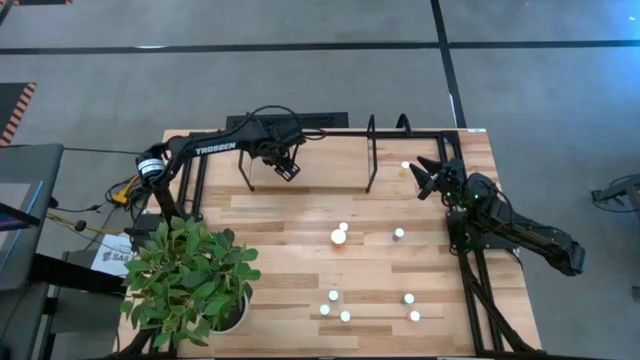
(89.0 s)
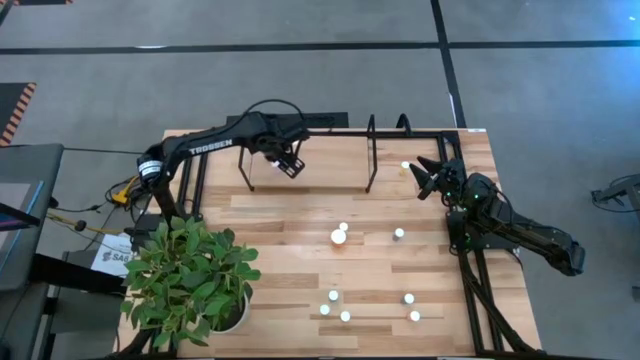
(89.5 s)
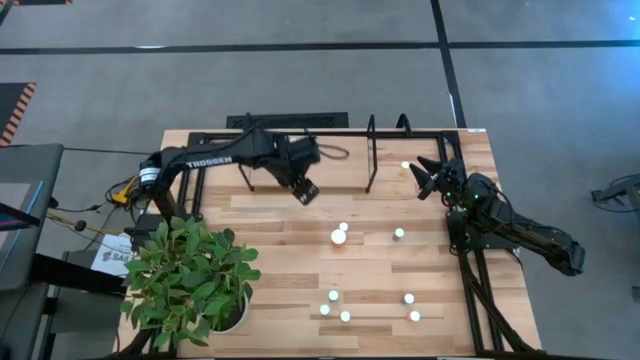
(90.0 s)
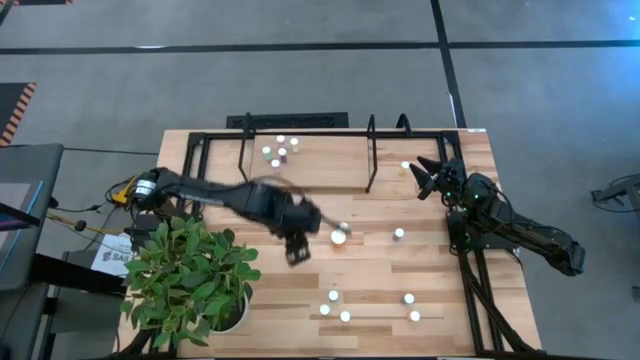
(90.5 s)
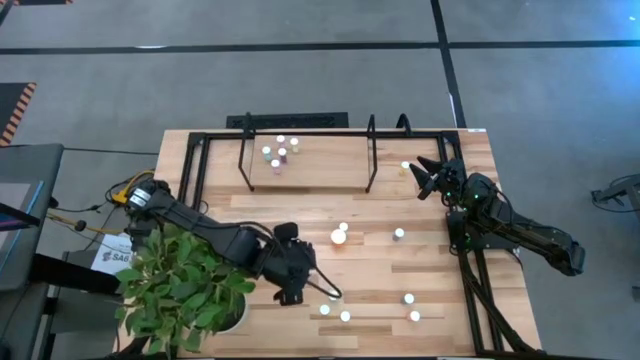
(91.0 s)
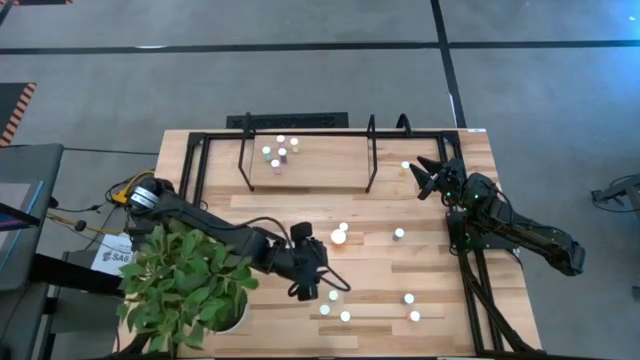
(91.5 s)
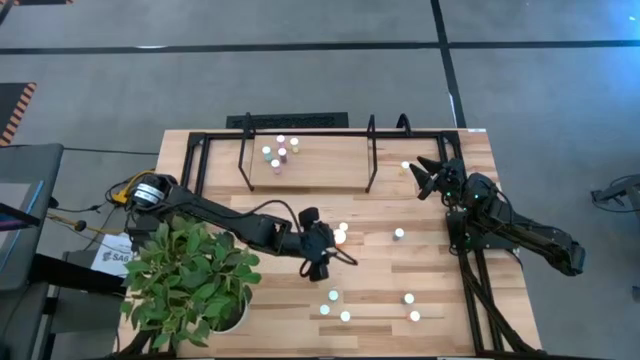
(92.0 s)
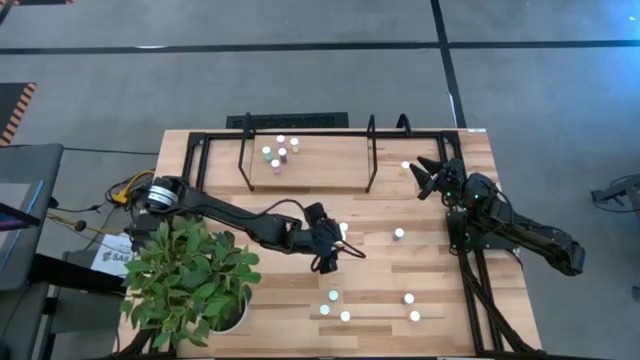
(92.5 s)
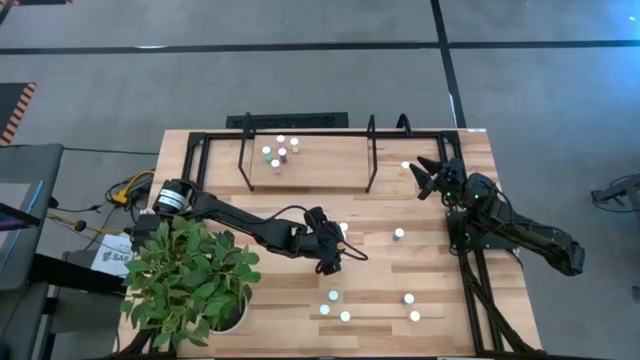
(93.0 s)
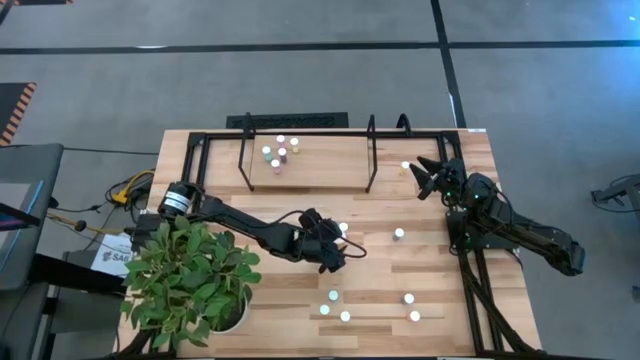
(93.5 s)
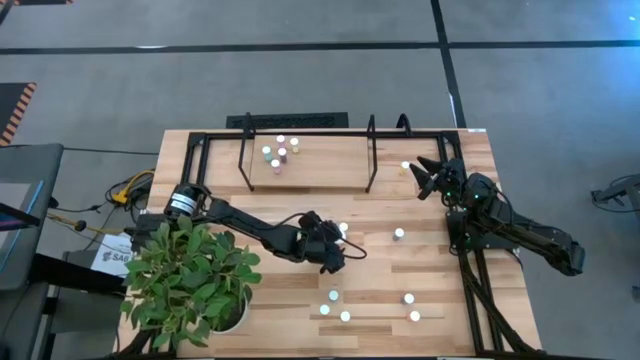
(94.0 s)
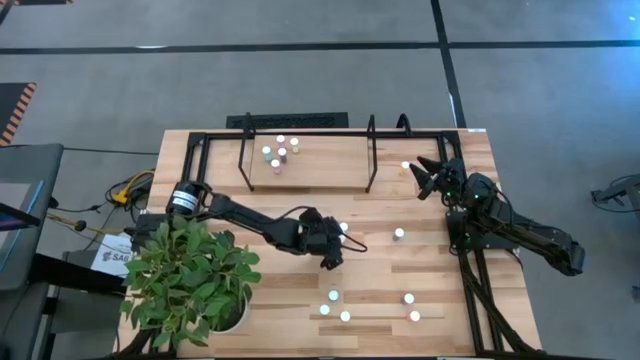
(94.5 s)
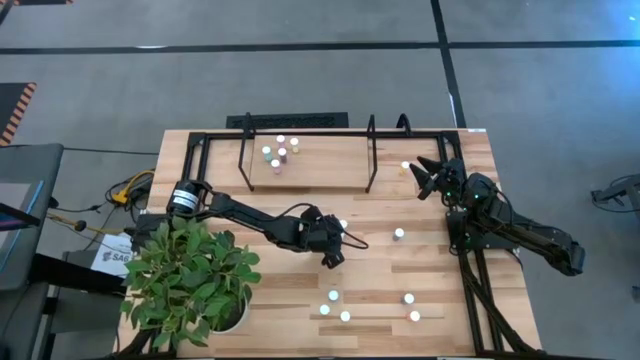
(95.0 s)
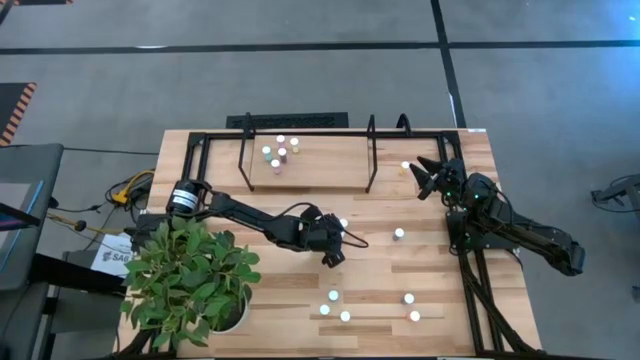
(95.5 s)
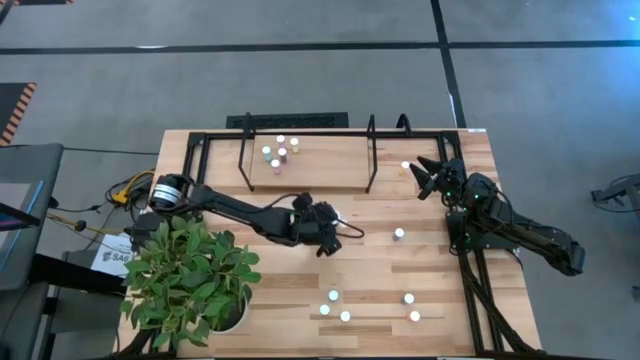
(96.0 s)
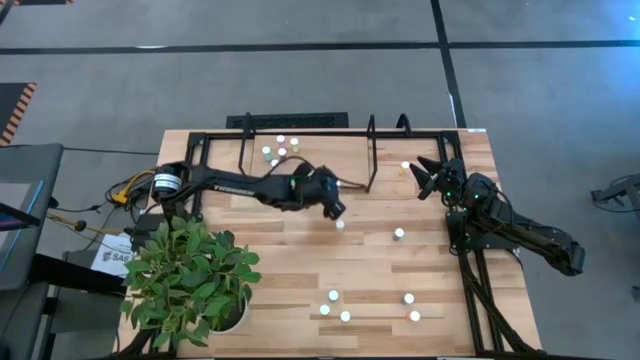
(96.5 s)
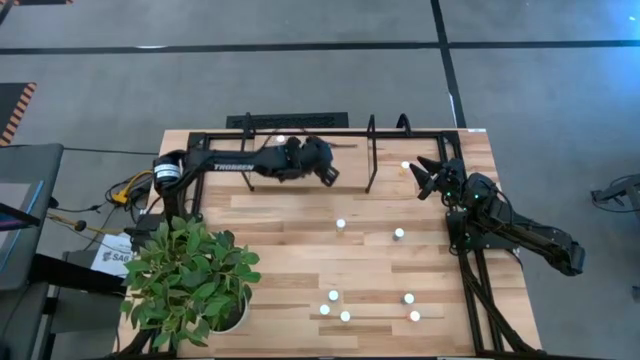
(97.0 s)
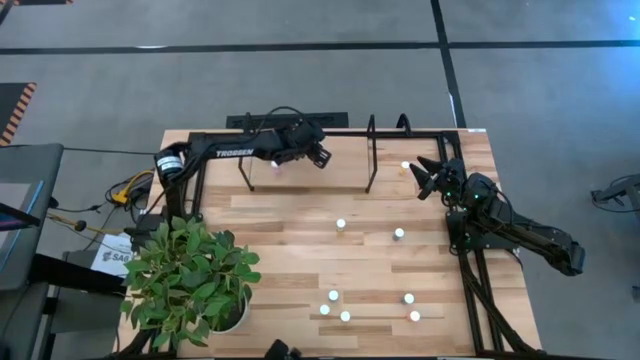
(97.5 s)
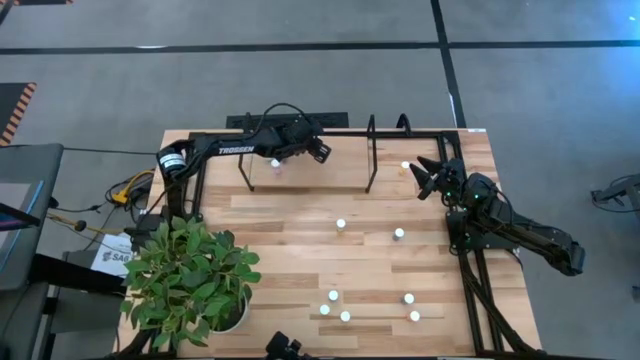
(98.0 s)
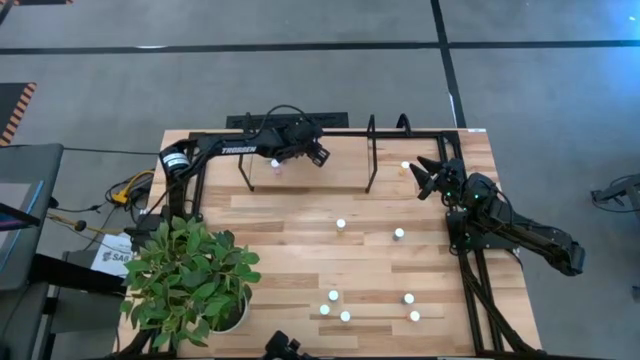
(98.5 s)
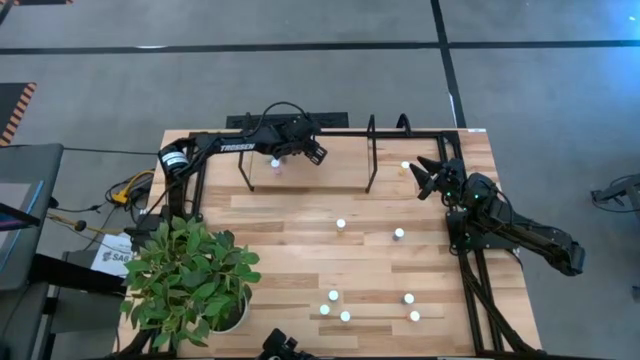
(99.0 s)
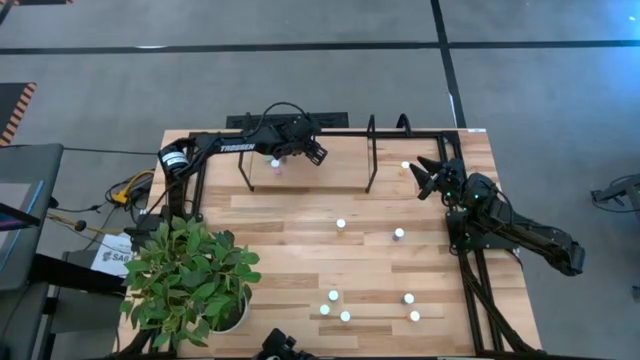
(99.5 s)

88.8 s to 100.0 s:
Task: Pick and place medicine bottles onto shelf by color
Put the orange pill bottle on the shelf

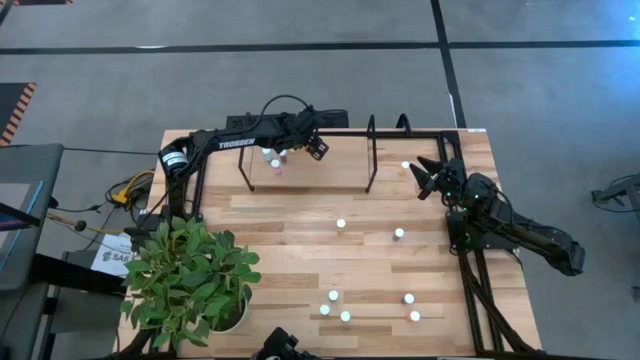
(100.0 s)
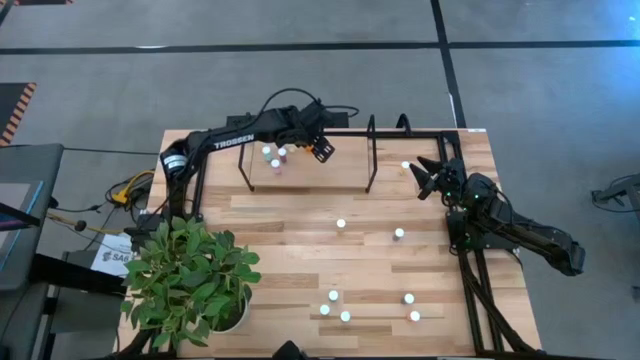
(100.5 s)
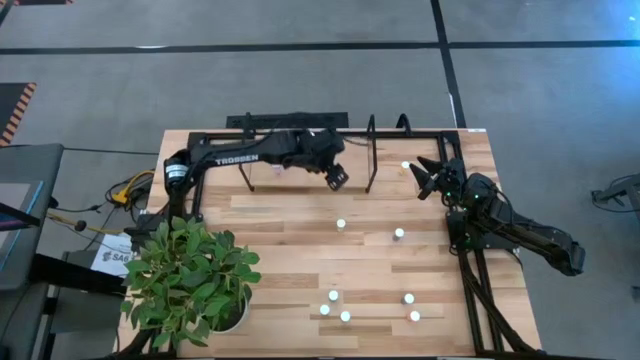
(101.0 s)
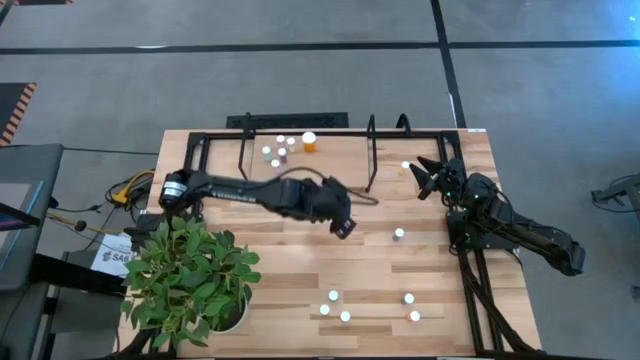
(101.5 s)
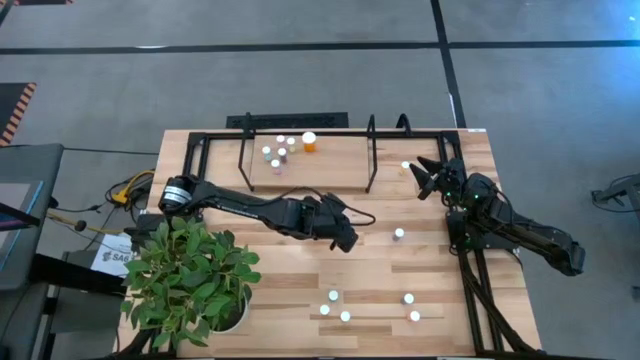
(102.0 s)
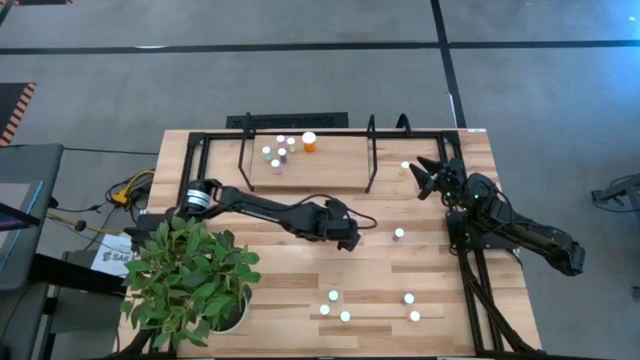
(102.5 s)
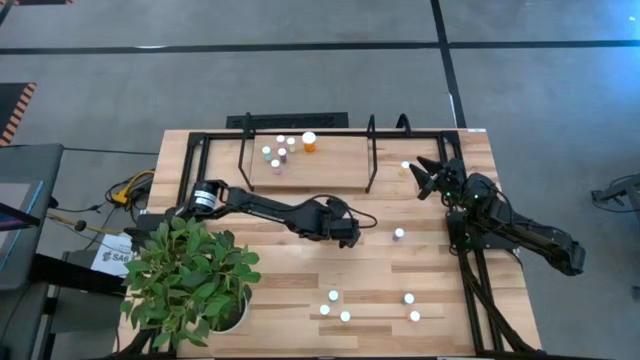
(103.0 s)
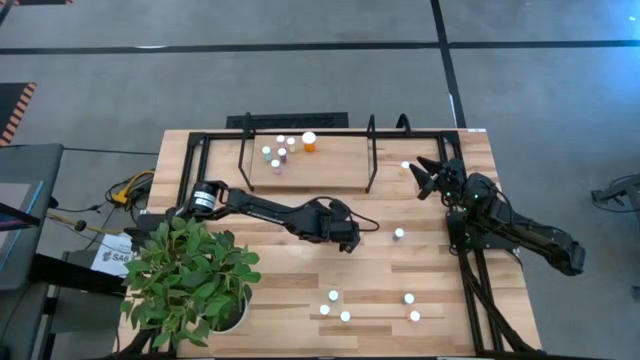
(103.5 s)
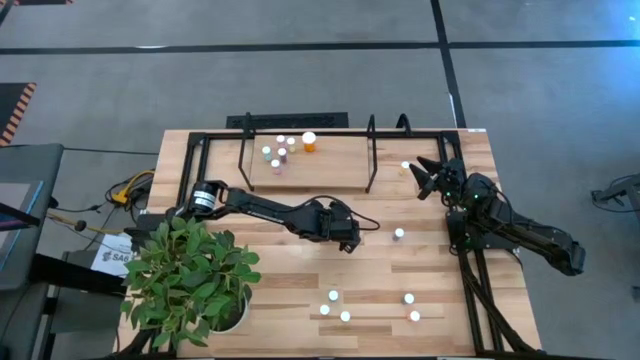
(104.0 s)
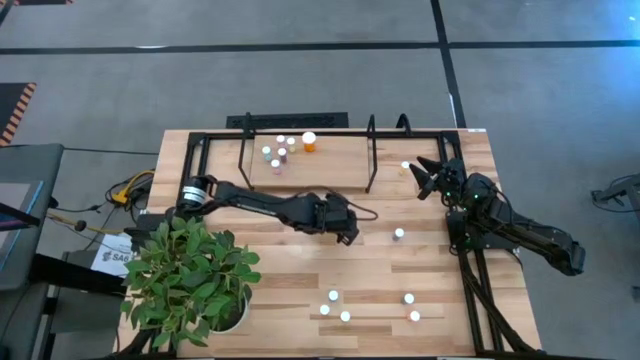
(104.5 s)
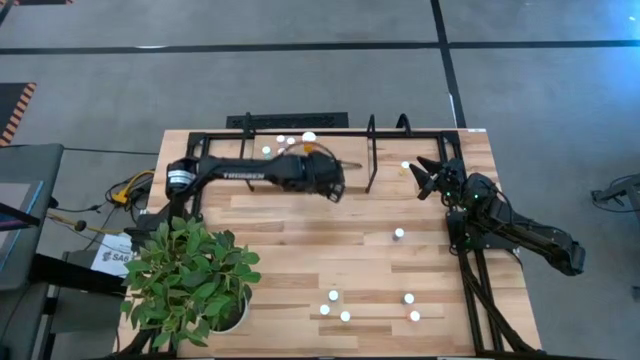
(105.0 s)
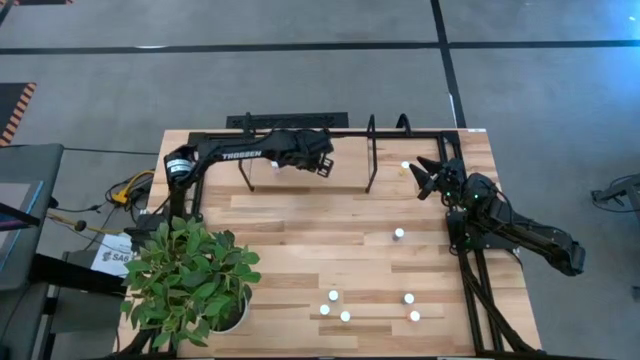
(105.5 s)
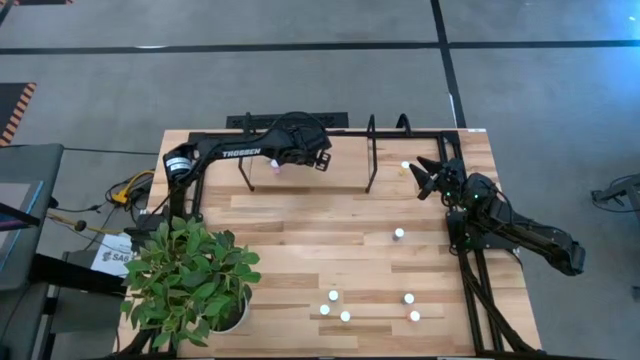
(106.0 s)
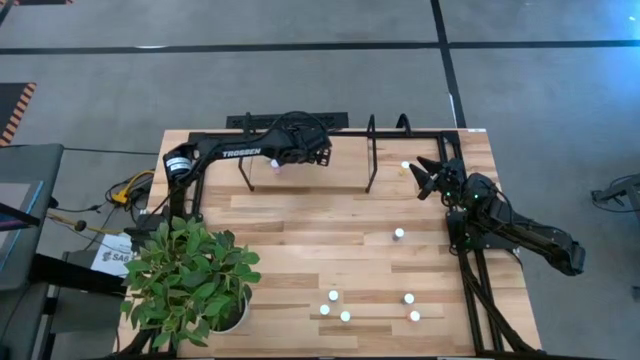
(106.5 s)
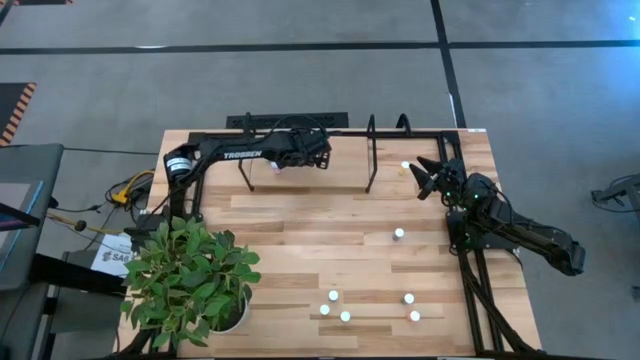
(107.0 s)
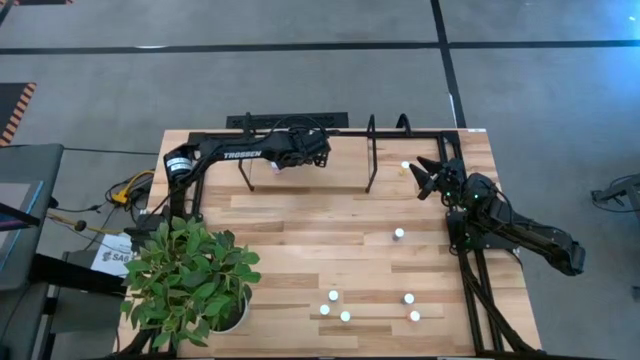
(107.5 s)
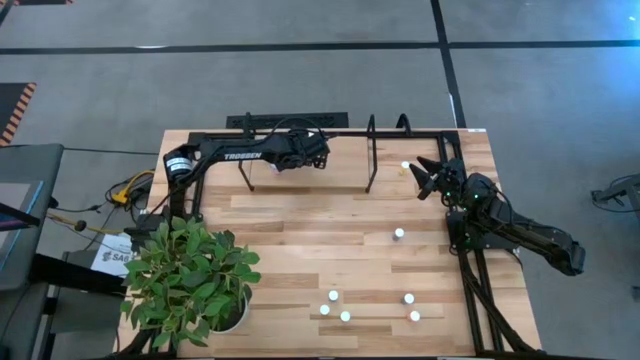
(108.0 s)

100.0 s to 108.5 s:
Put the yellow pill bottle on the shelf

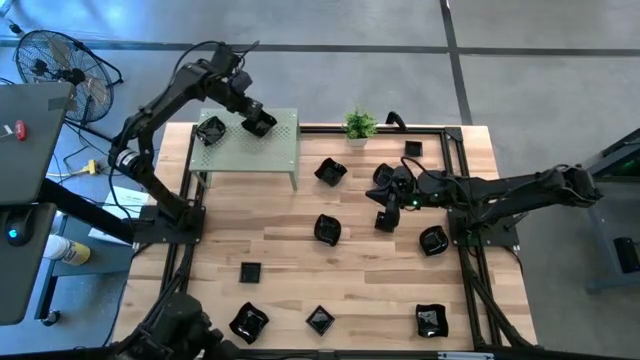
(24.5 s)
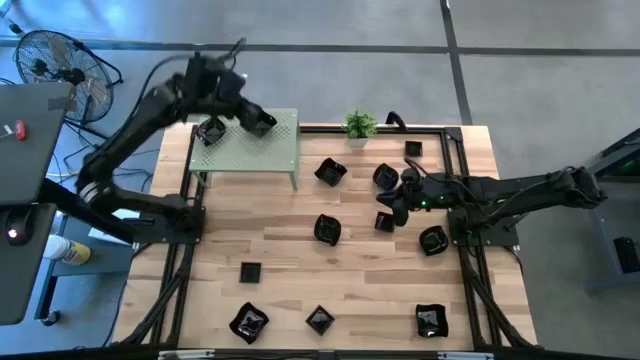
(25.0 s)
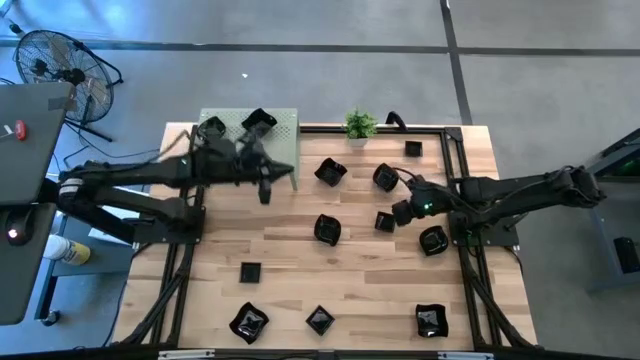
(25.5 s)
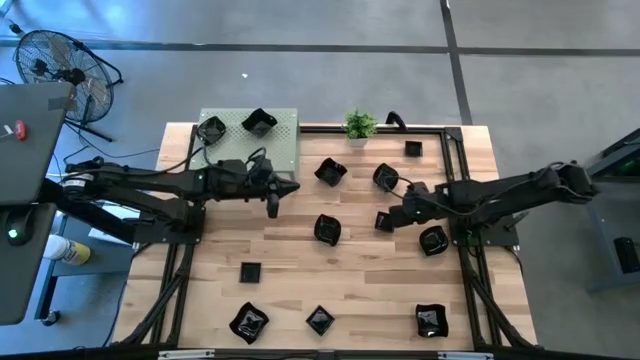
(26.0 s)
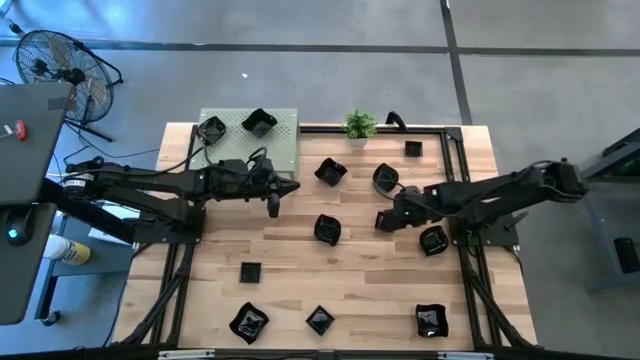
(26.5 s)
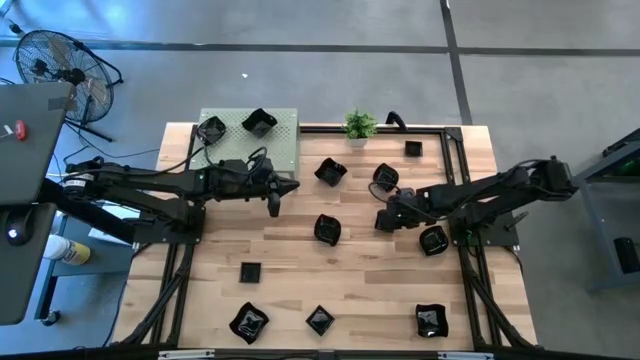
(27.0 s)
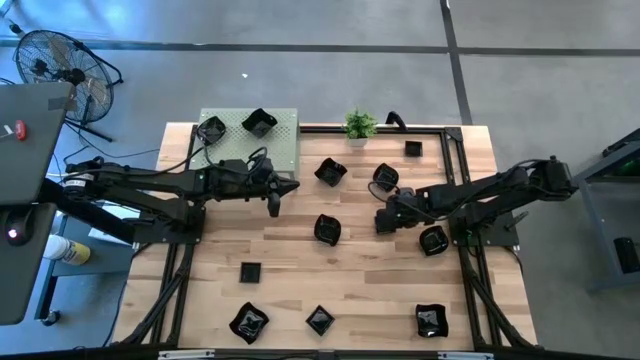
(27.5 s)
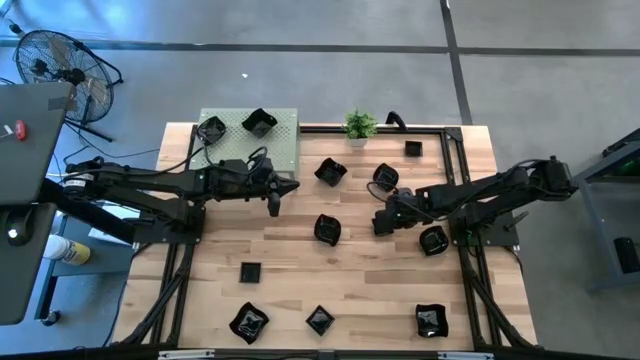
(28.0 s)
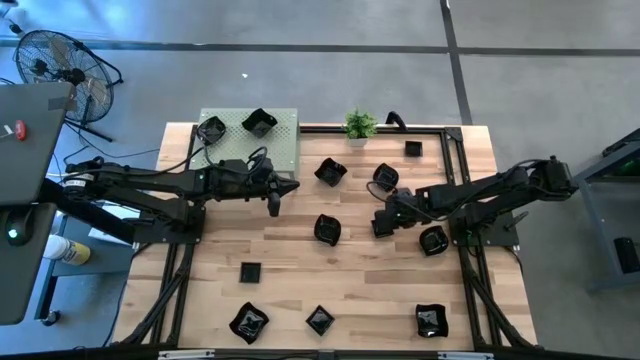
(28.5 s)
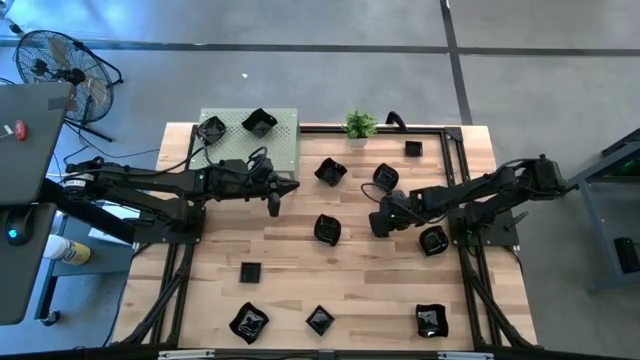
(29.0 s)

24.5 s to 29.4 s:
Task: Pick & Place Mini shaped plates
Put the black square plate on the shelf
